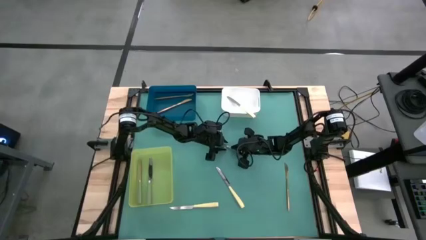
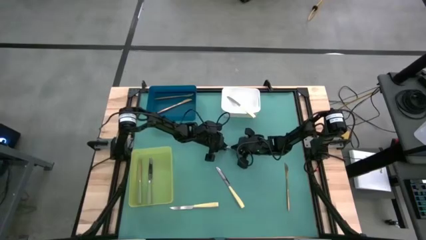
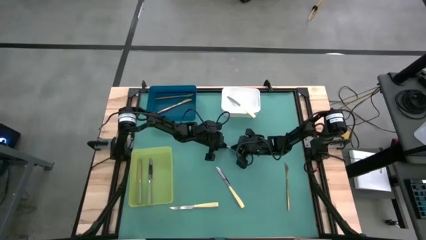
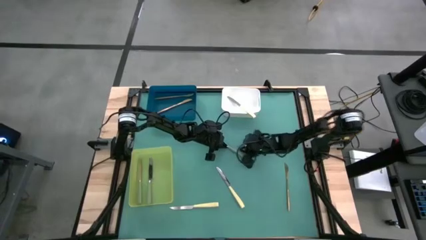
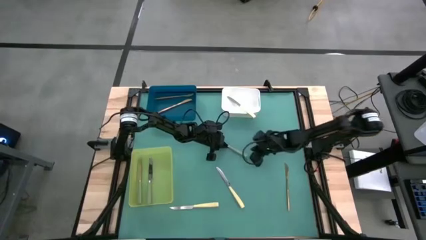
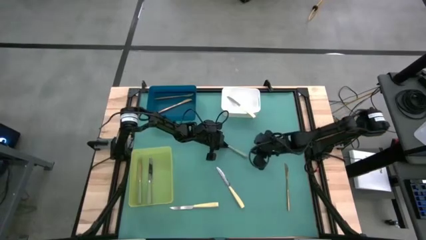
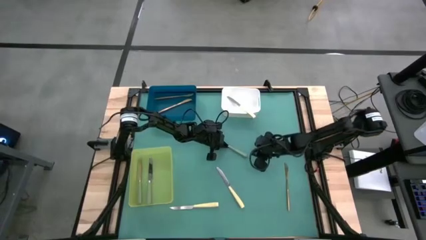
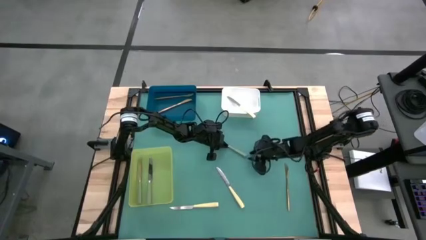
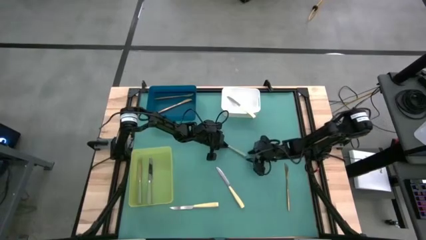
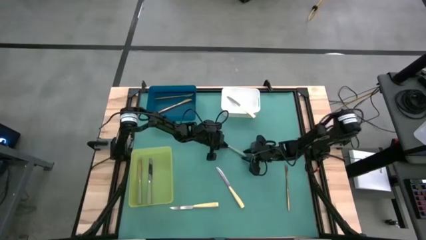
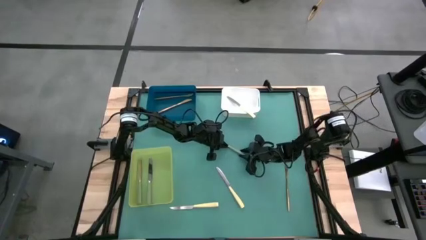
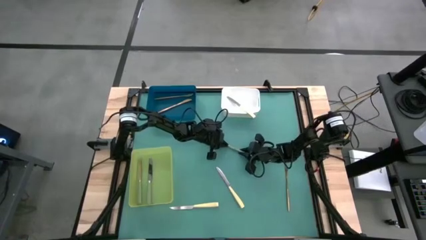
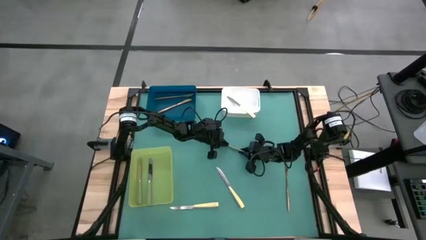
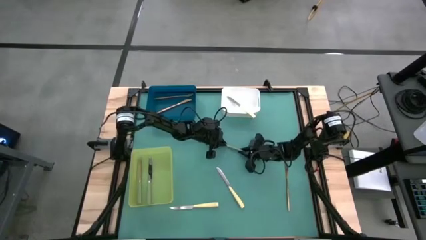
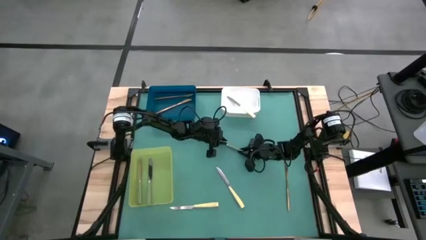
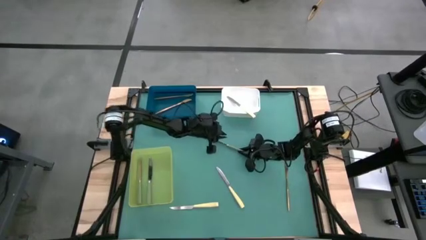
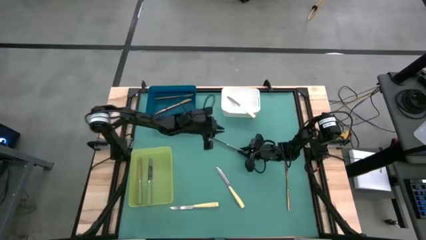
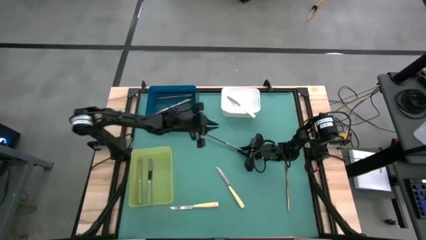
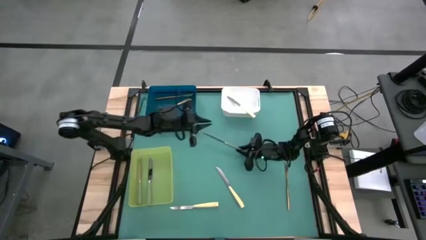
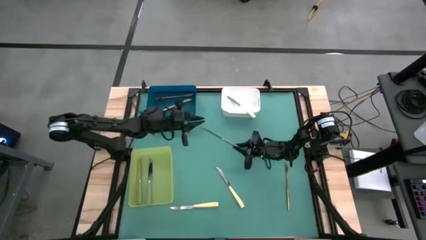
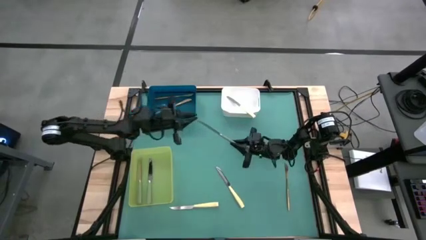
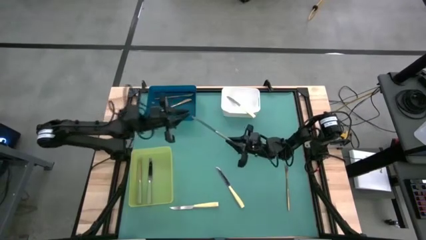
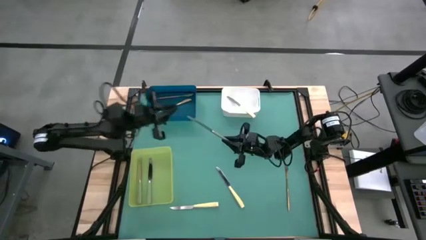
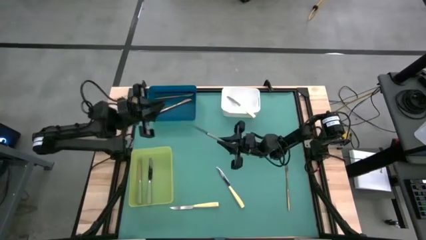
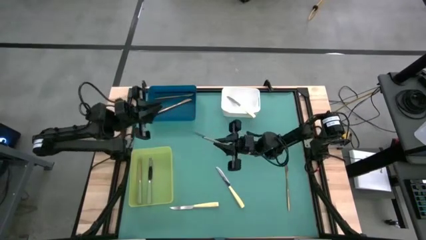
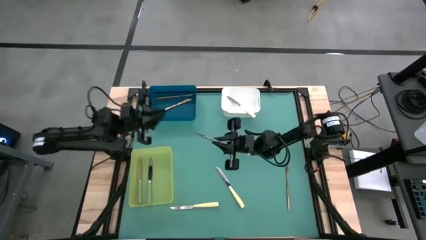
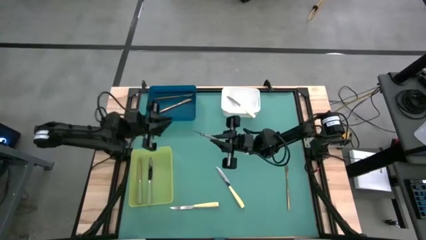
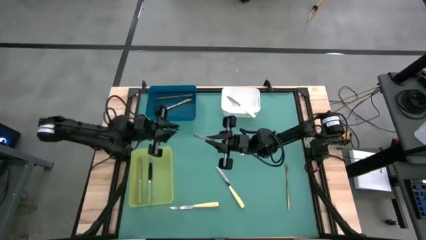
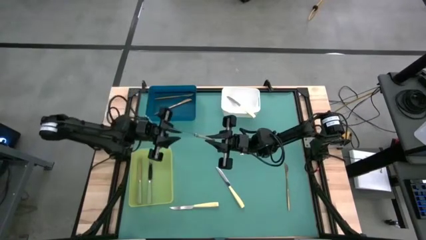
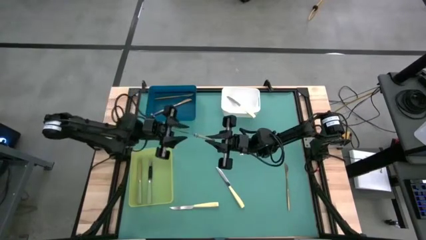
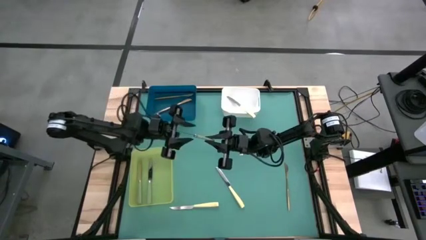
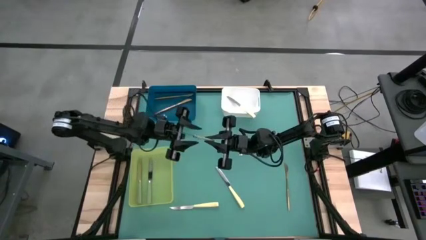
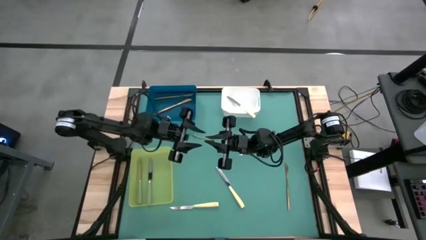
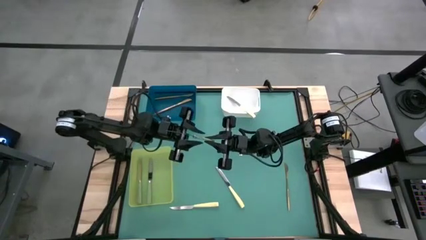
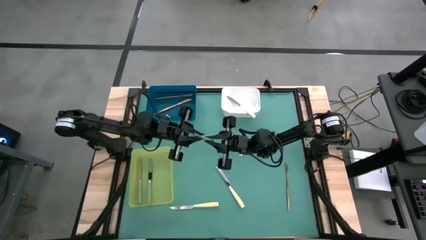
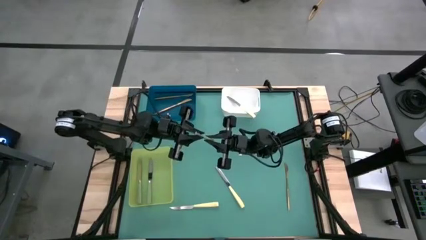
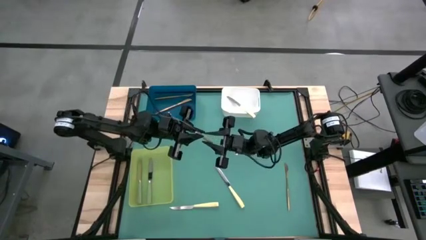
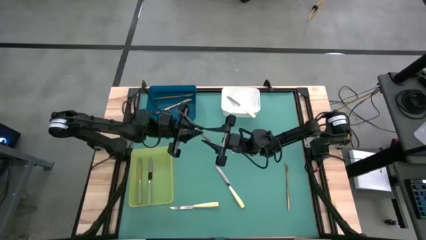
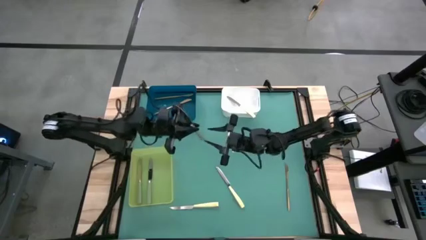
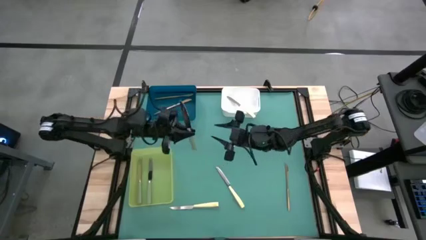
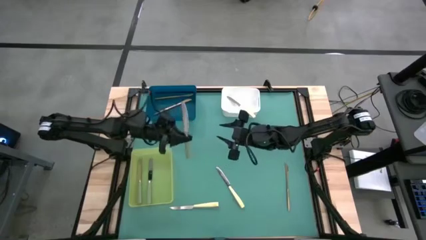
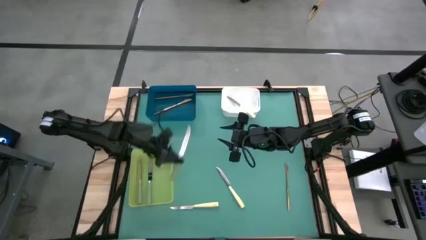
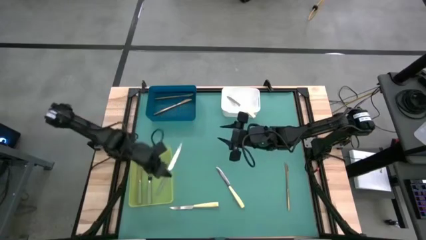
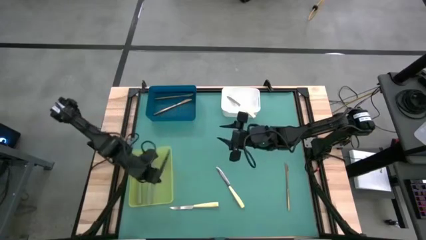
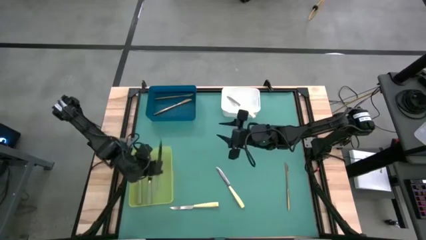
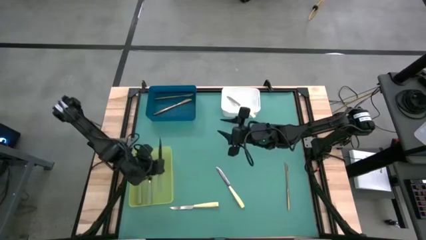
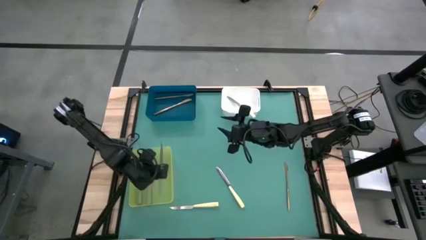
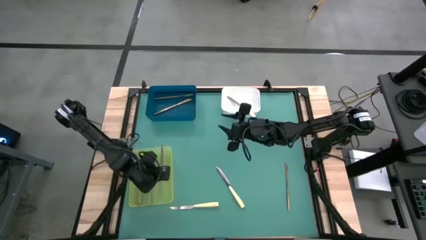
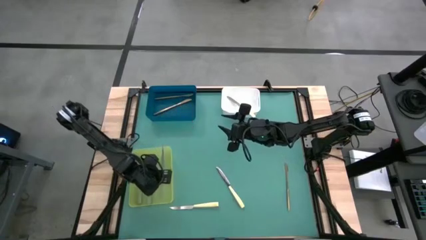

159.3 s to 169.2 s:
Task: Sort silverware by color (type)
Put the green knife into the green bin

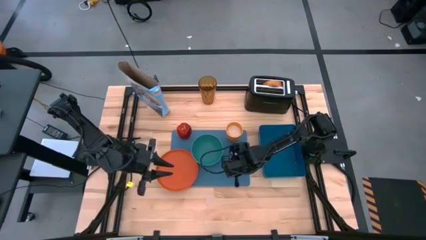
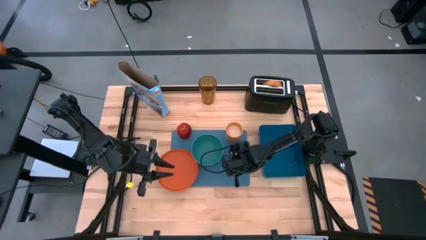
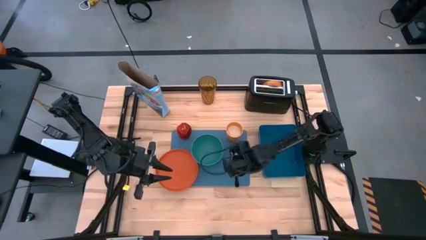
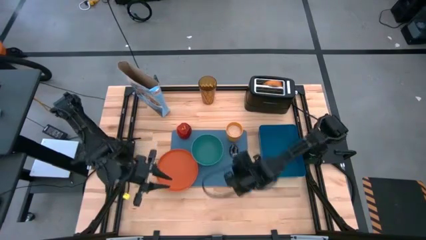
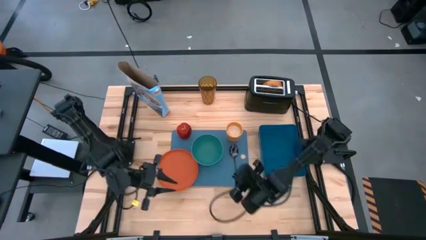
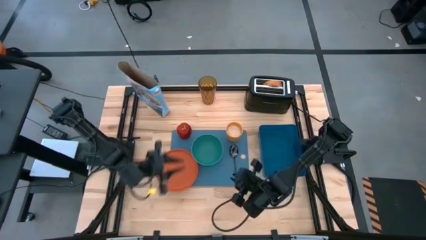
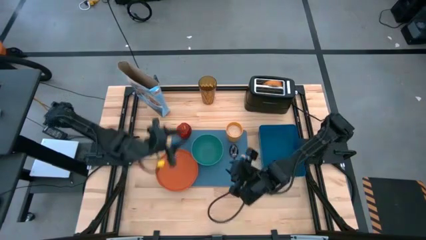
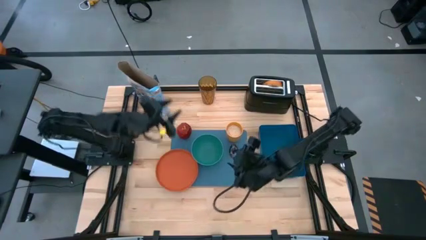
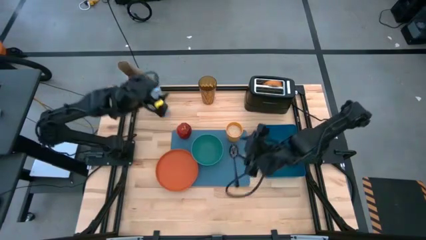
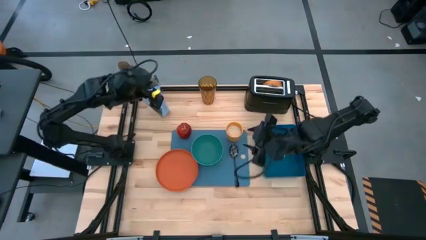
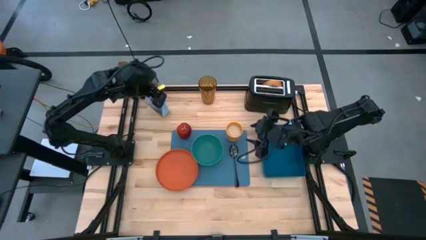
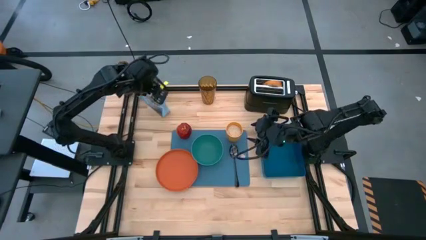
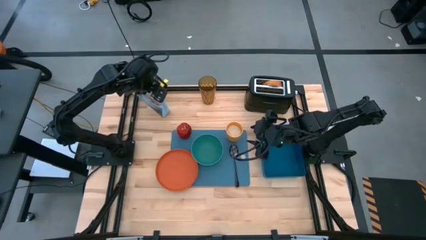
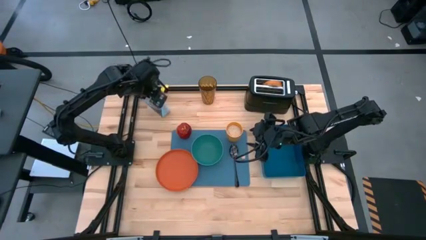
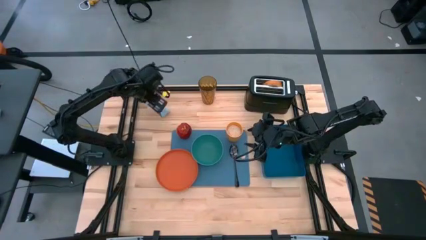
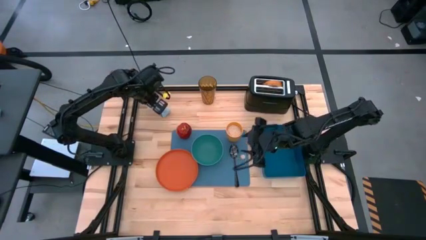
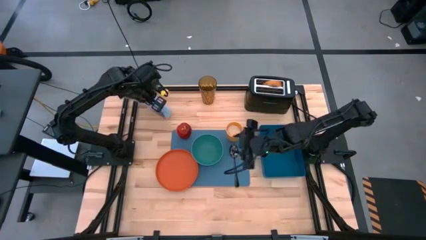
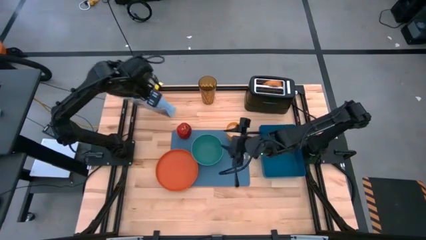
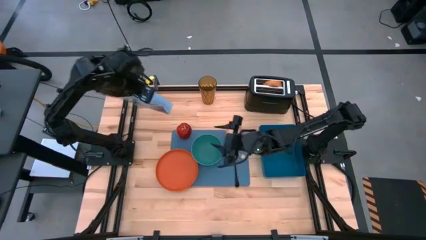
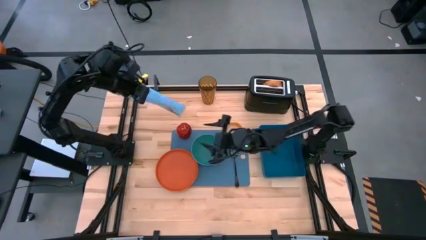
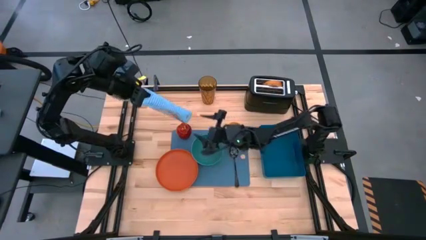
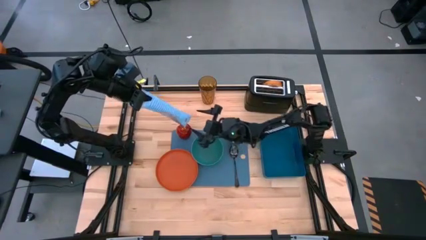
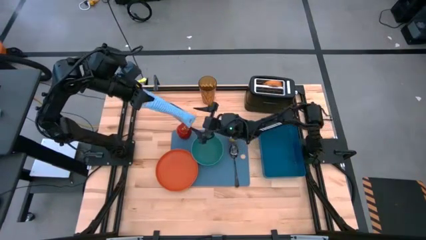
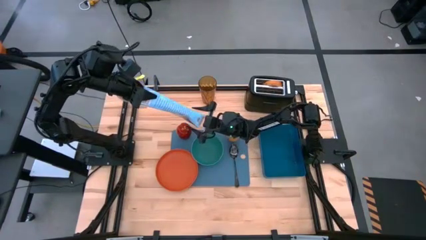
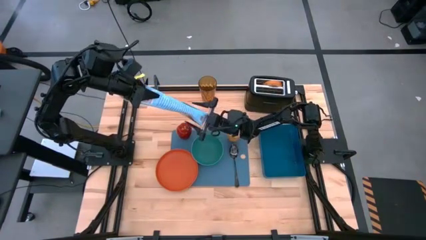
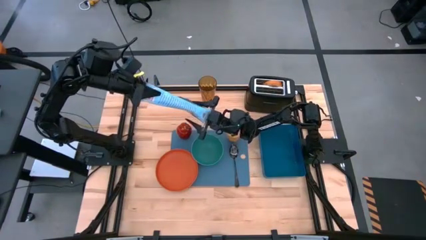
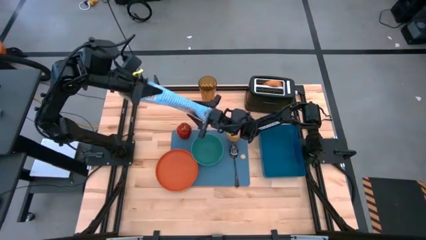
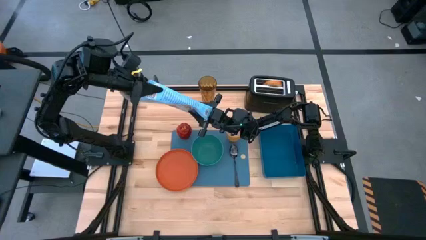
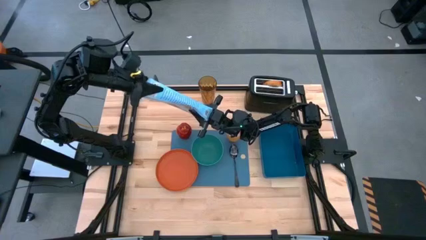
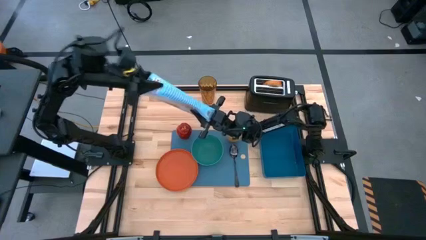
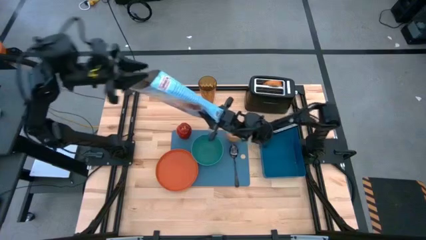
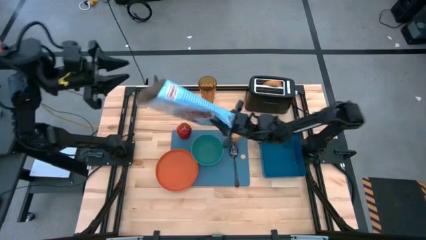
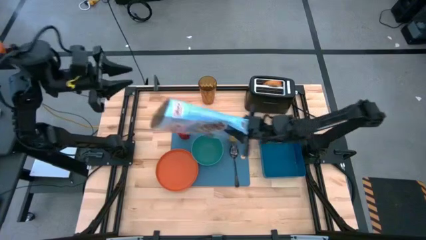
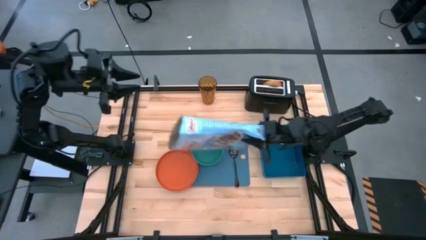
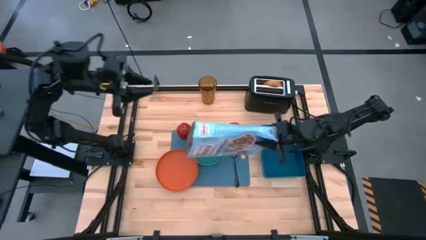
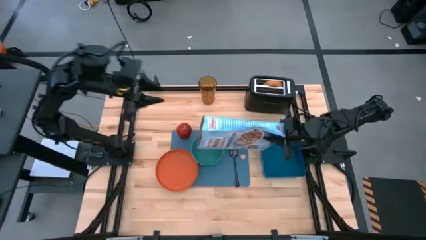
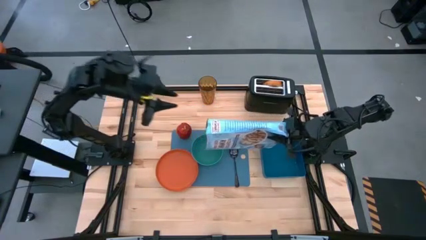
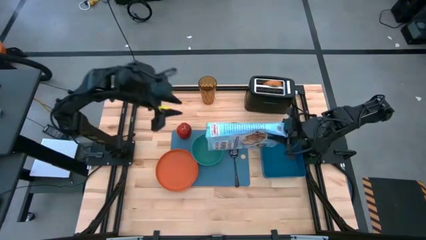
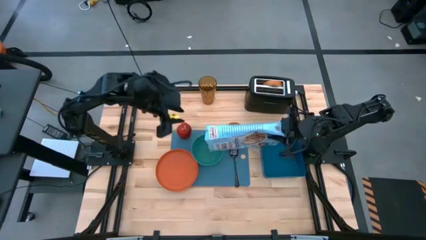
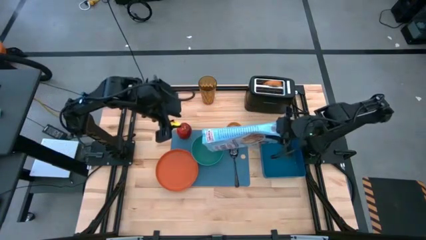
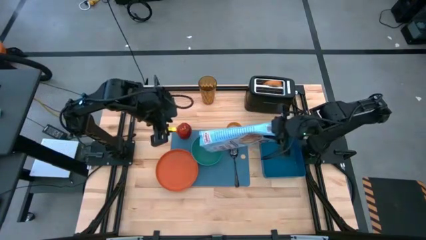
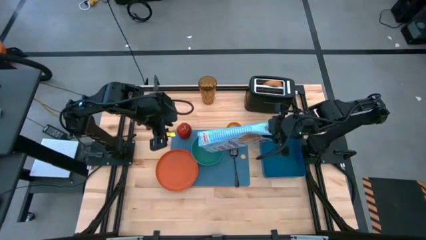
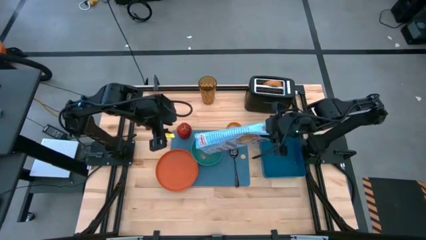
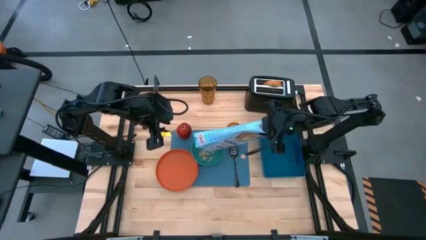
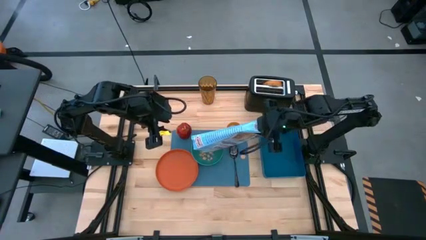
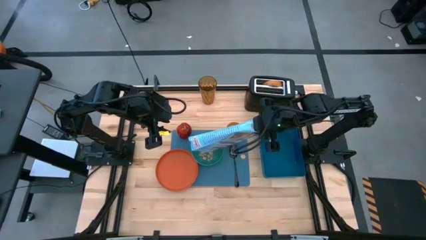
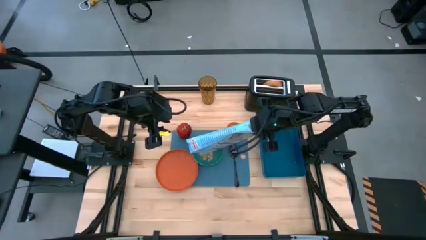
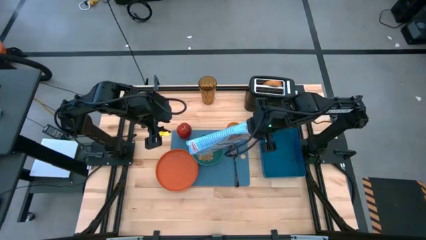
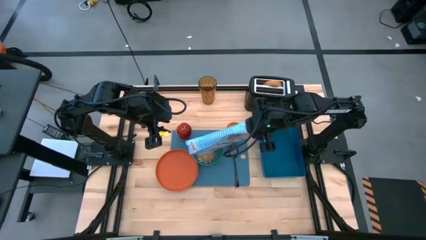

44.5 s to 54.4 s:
Task: Arrange a breakfast setting
Pour the cereal from the cereal box into the green bowl
